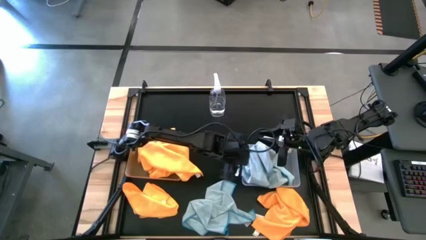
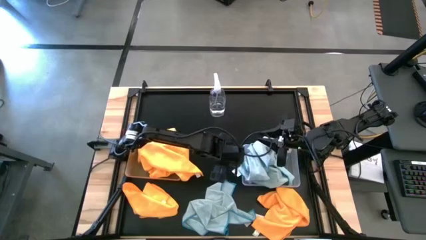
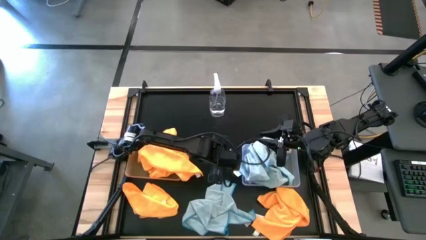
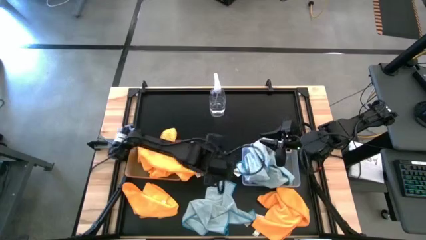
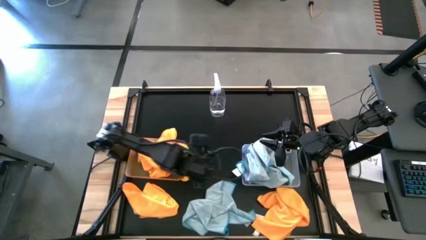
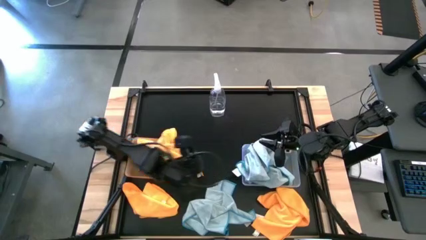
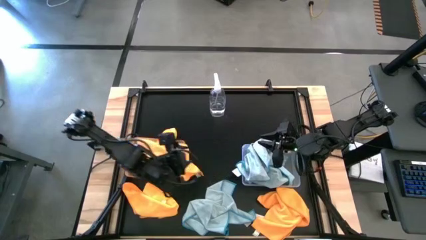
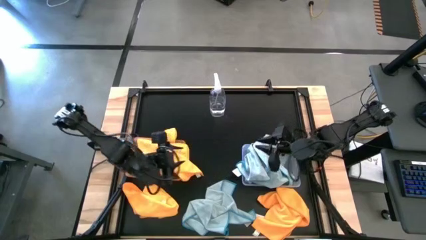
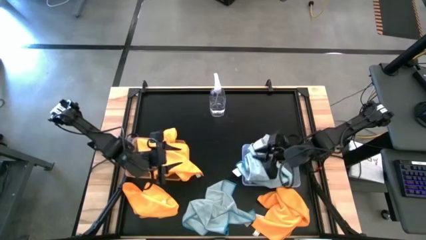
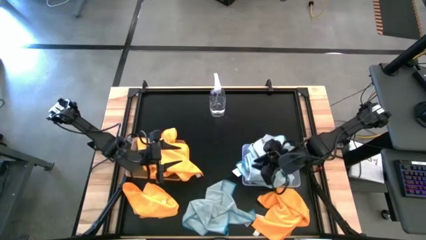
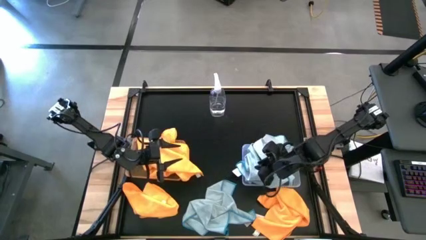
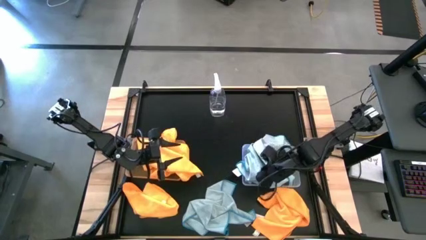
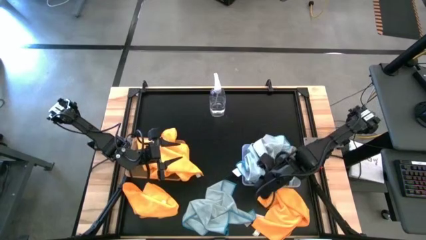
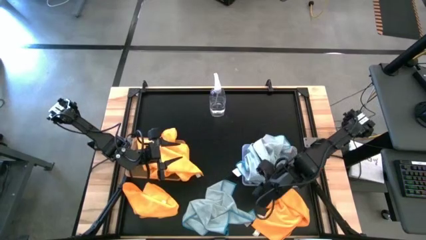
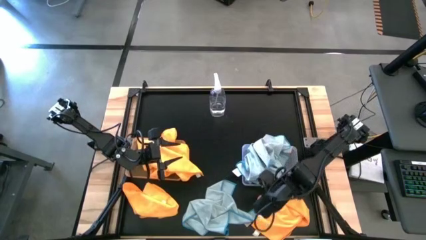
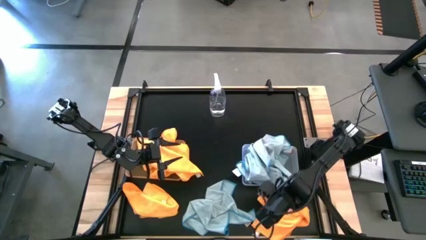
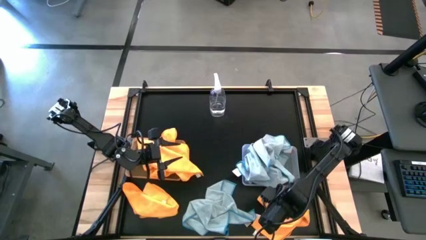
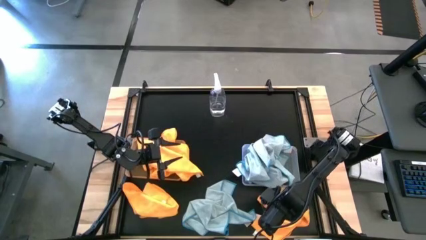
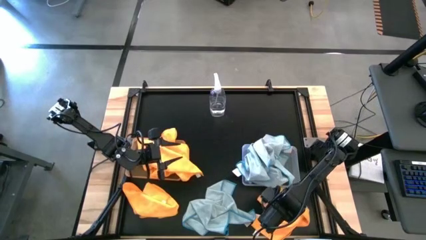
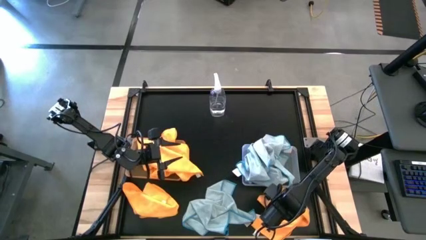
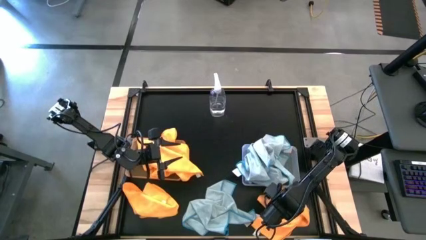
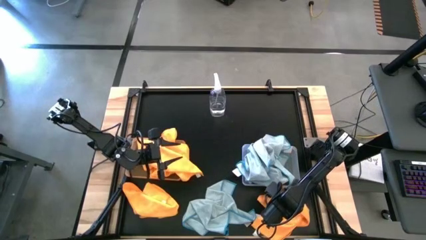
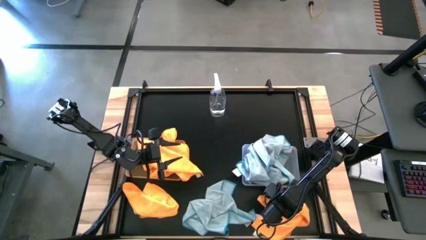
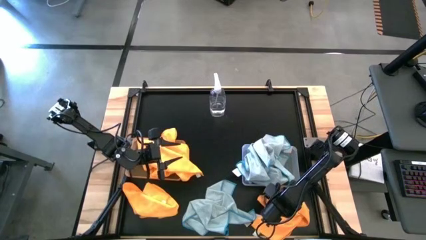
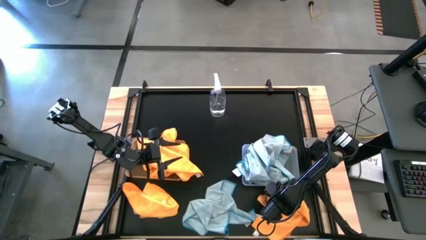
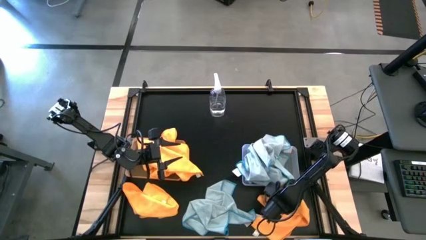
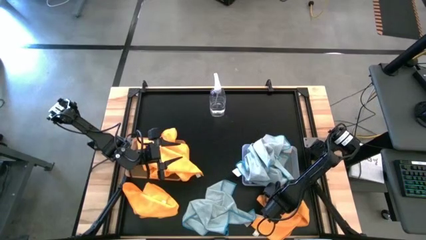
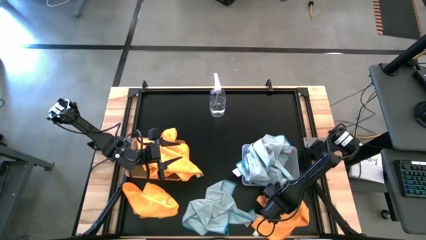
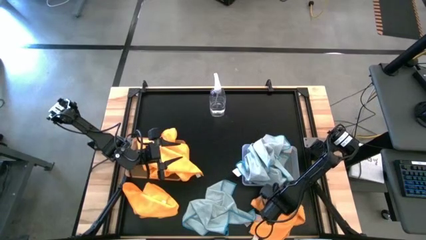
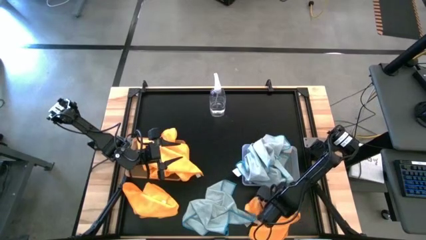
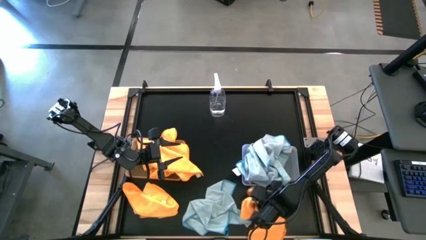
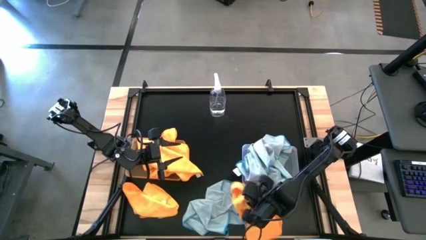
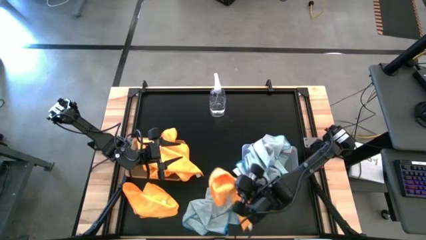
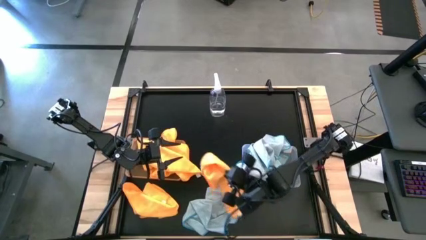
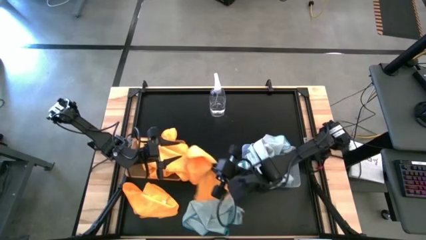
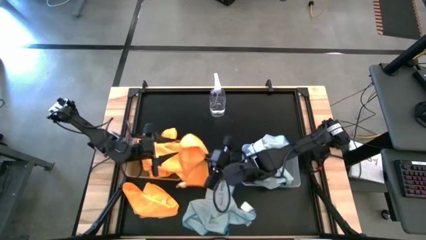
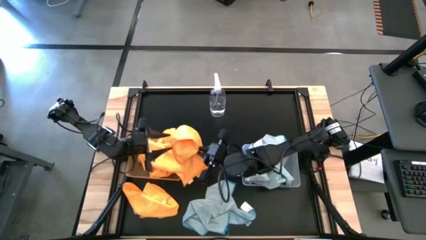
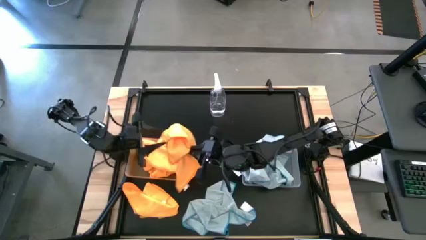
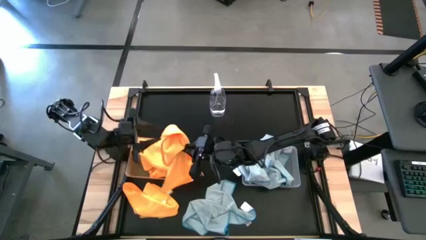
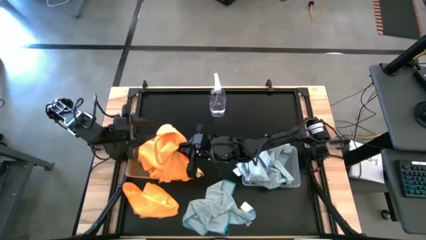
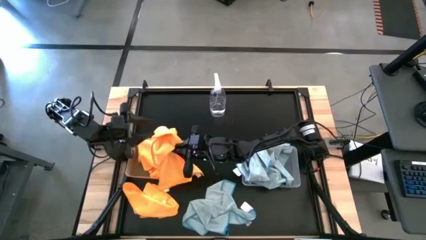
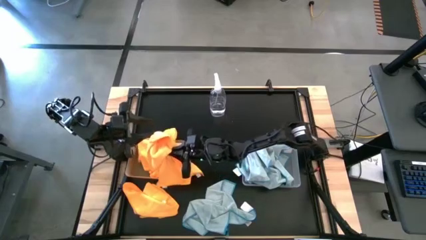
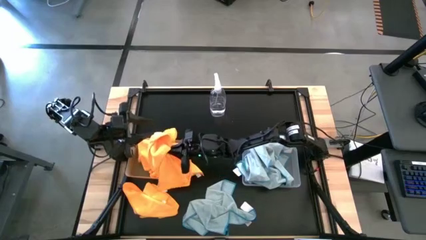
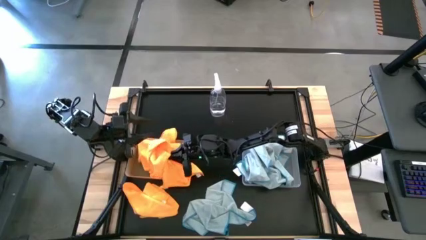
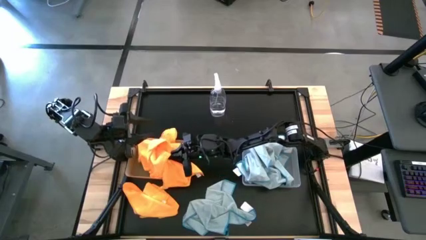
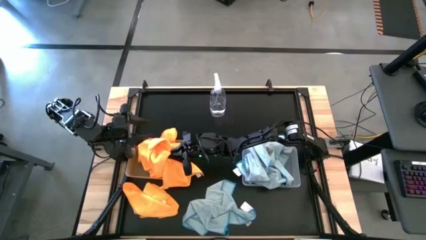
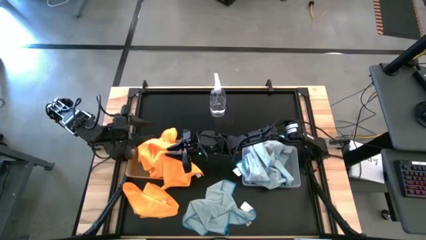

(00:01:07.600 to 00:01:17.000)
Task: Sort microfiber towel by color & place in baskets
Put the right orange microfiber cloth into the orange bin

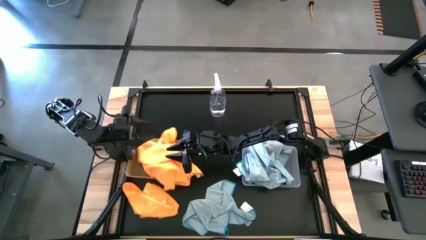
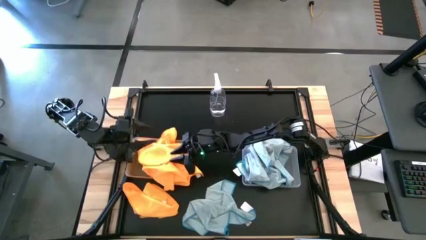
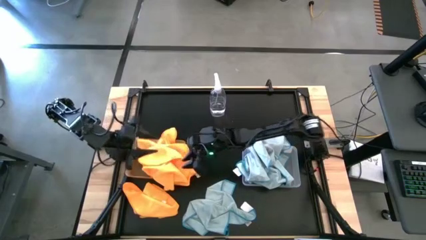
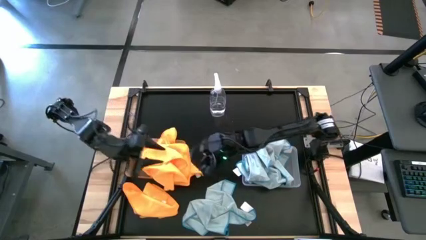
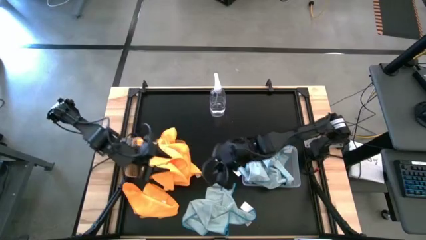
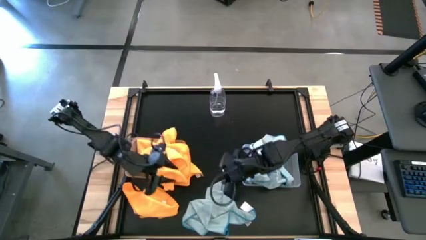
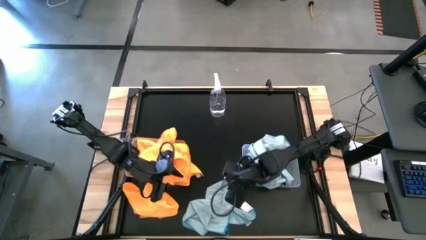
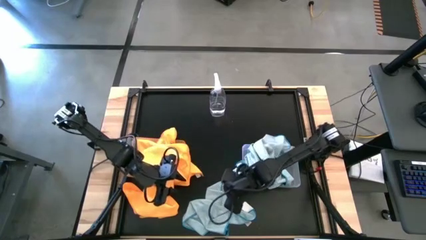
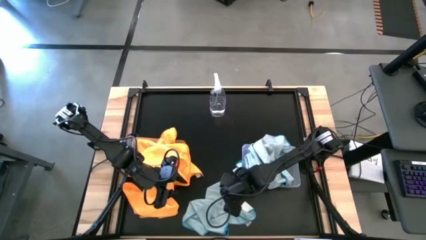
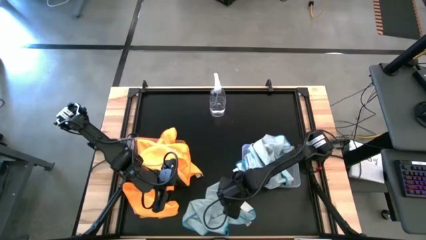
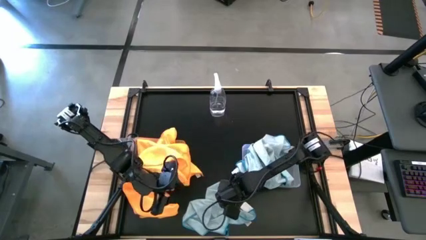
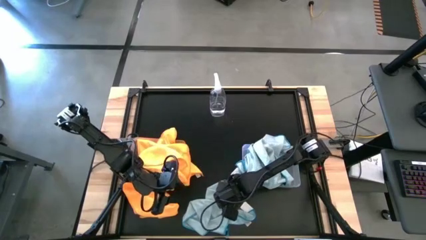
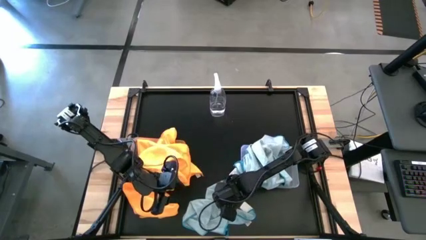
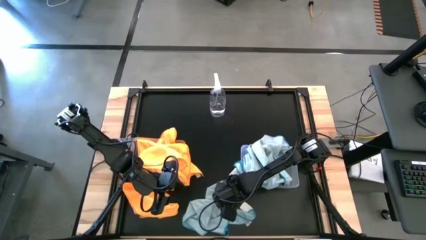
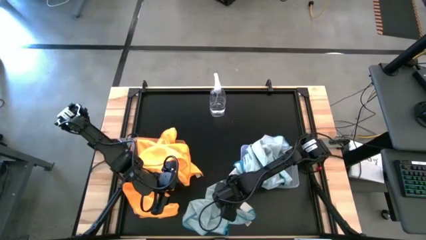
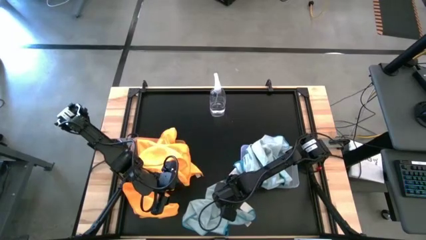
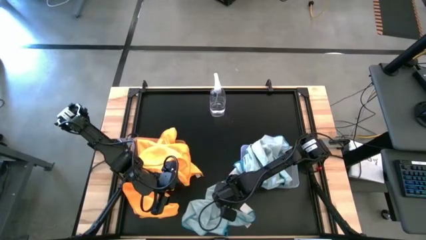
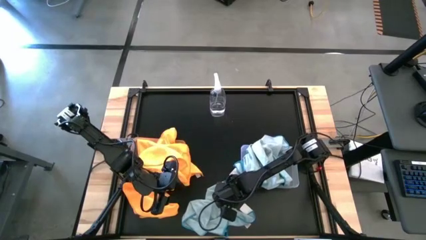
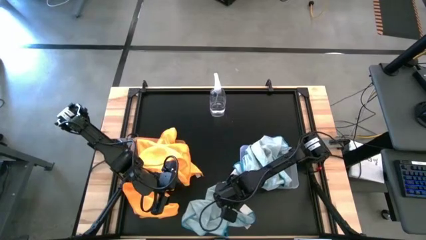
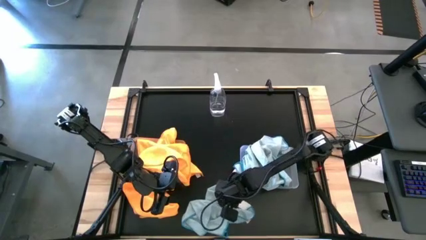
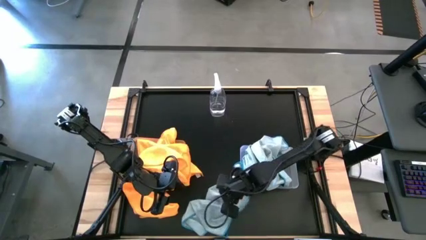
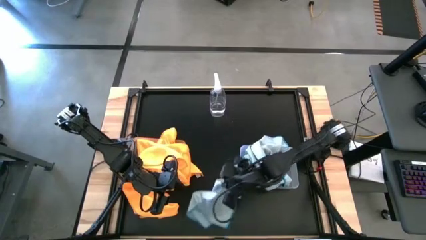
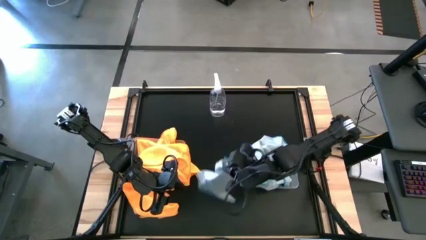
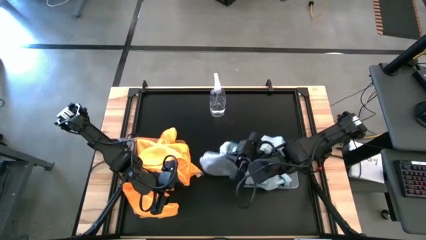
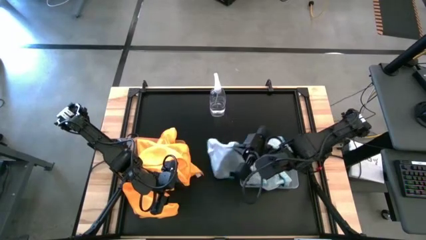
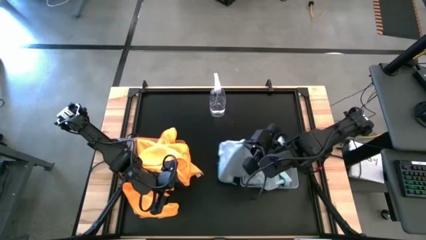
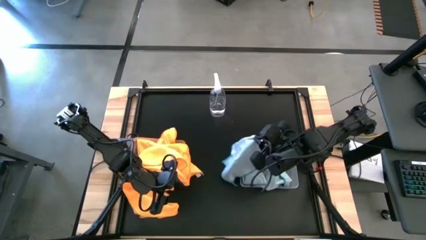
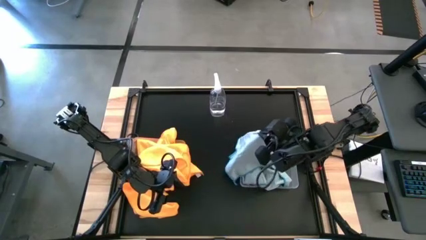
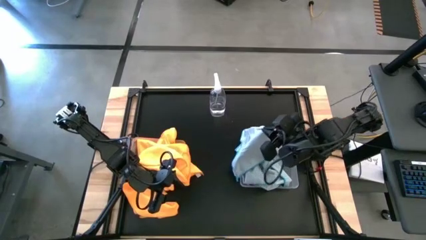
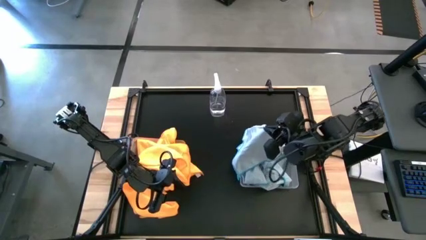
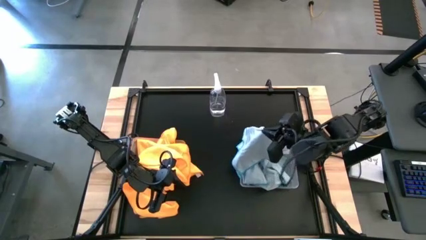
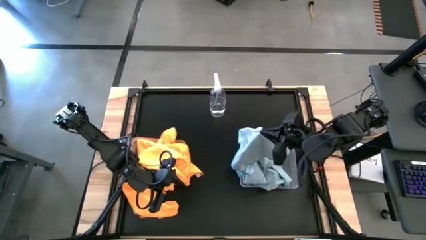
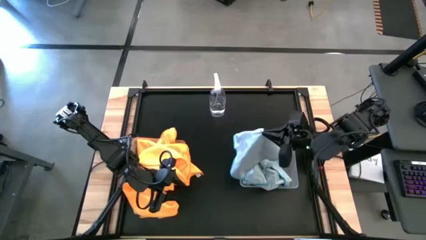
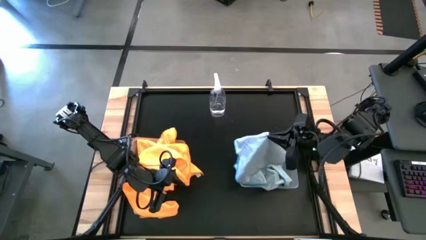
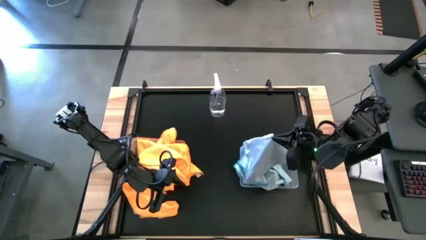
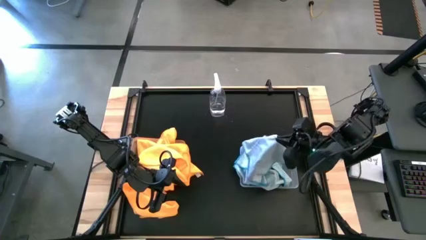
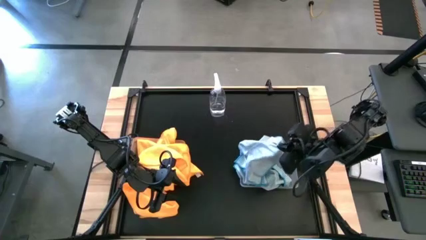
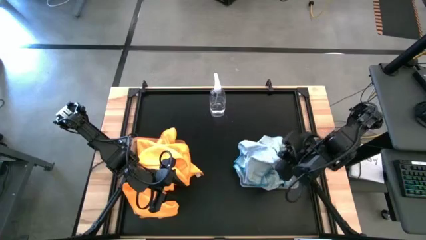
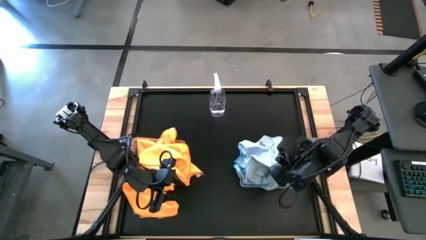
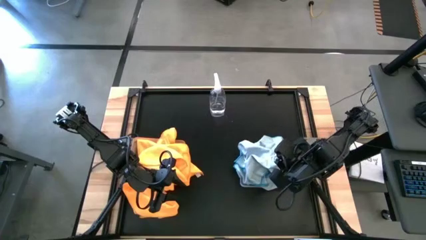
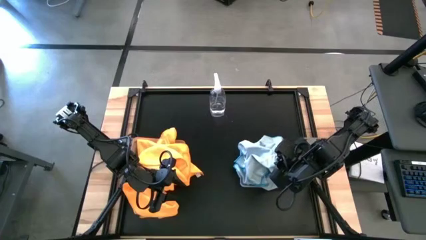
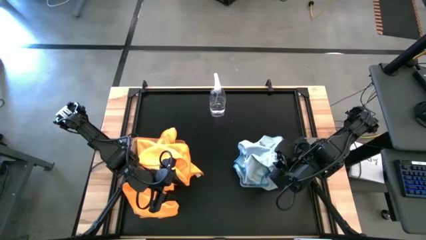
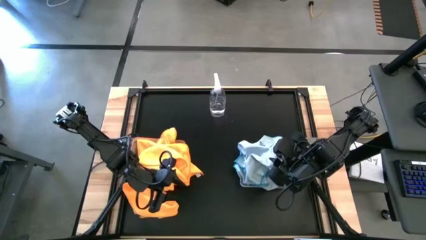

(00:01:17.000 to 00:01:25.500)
Put the blue microfiber cloth into the transparent bin
